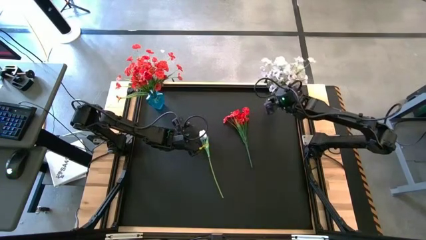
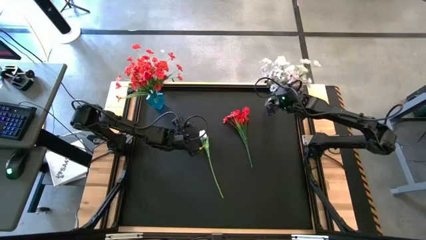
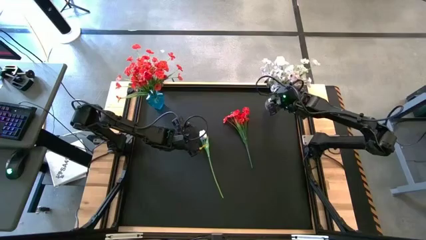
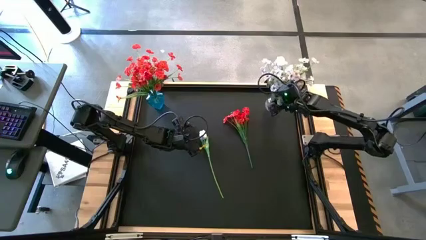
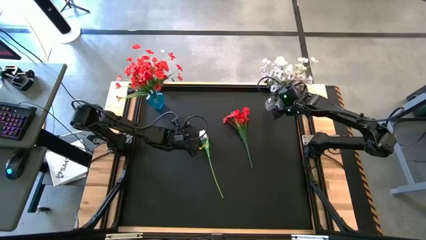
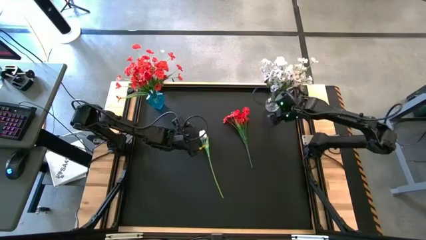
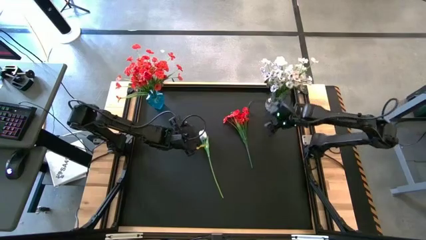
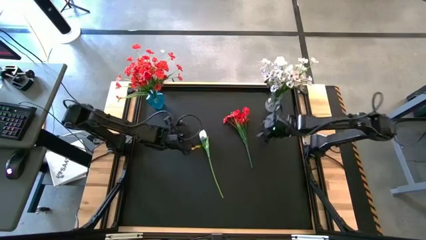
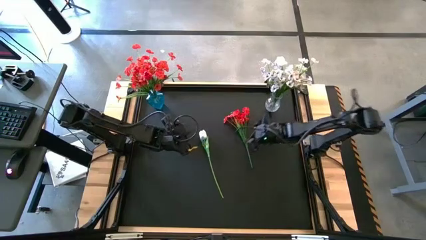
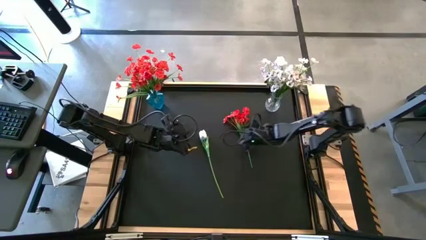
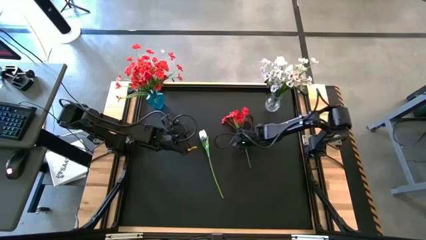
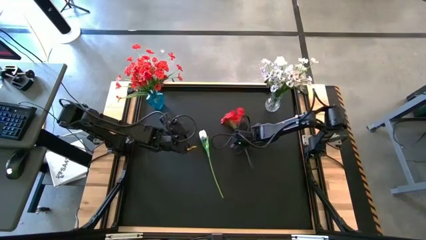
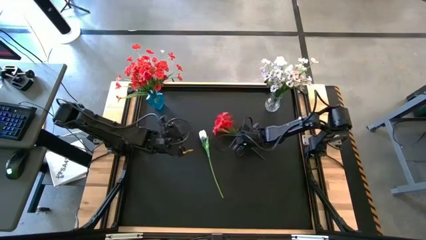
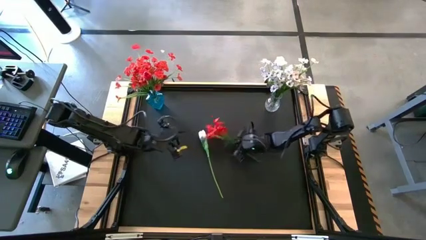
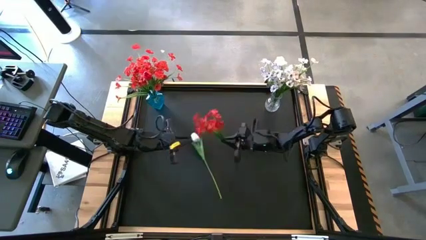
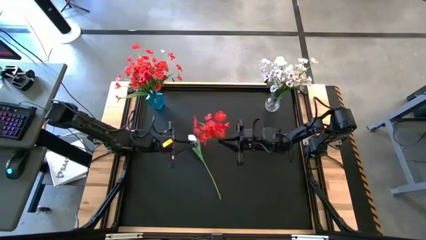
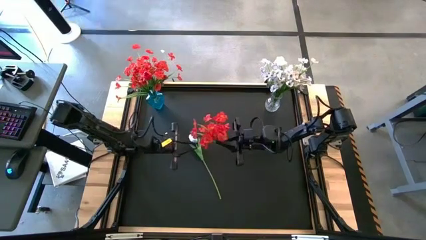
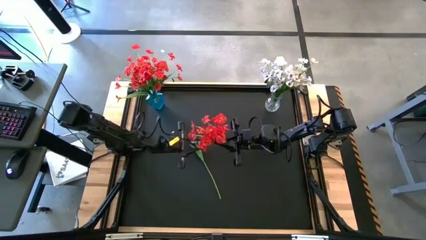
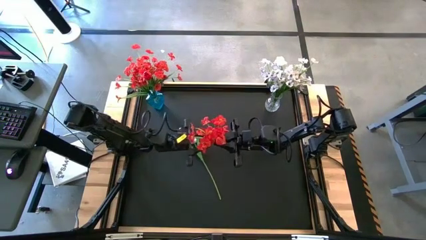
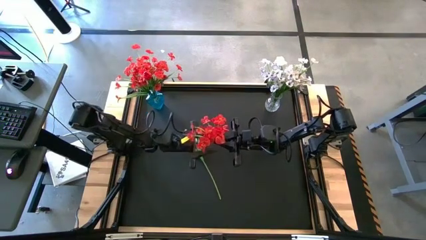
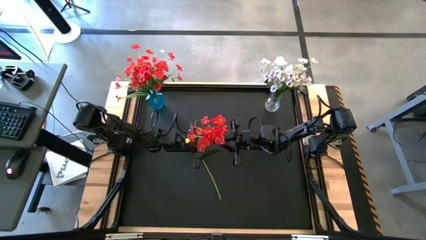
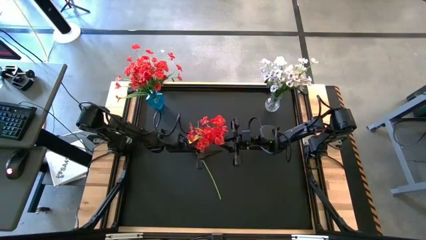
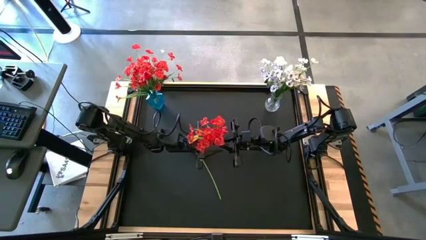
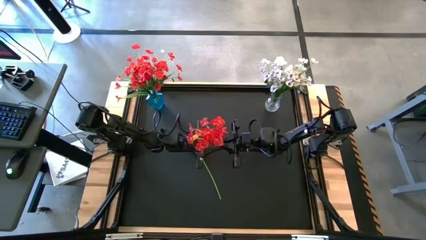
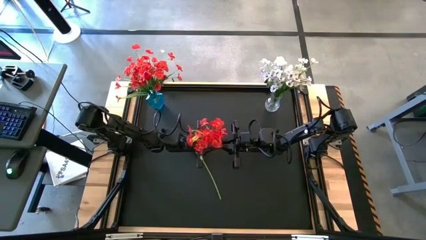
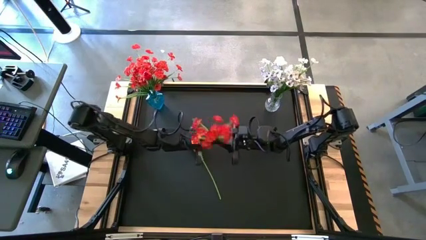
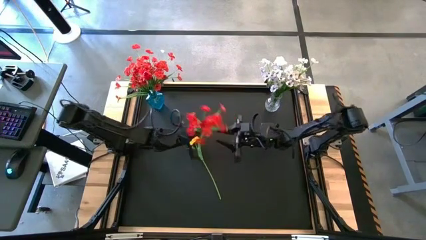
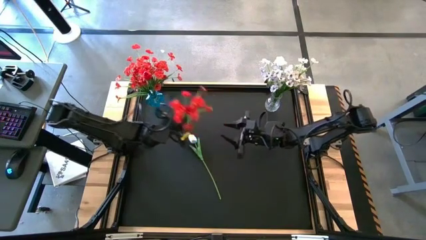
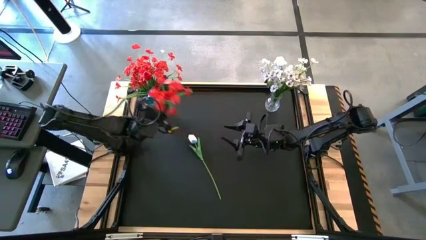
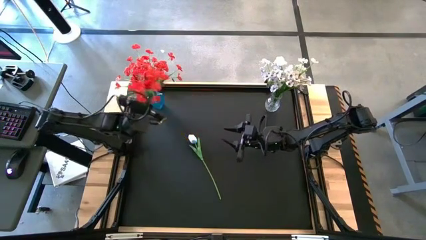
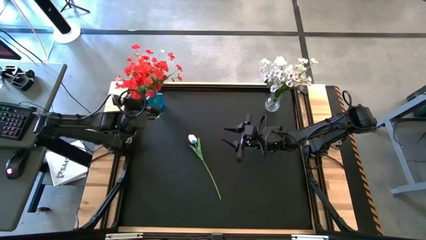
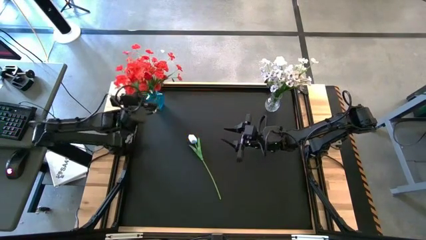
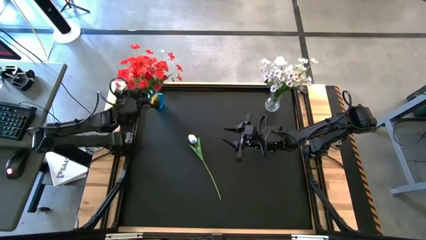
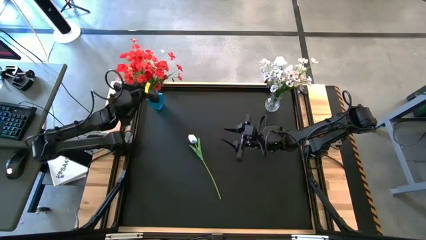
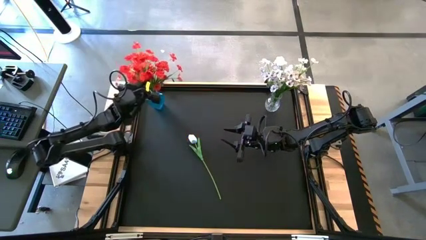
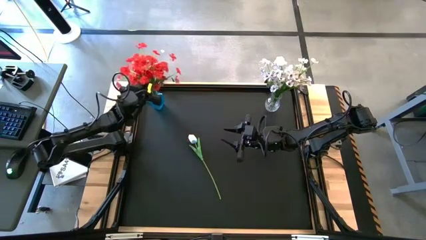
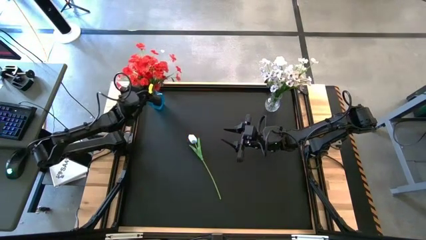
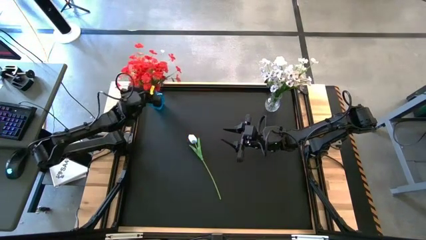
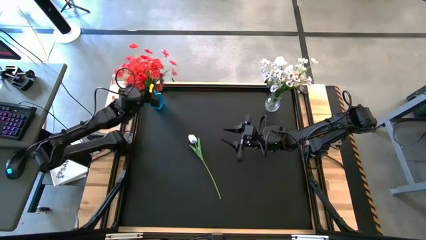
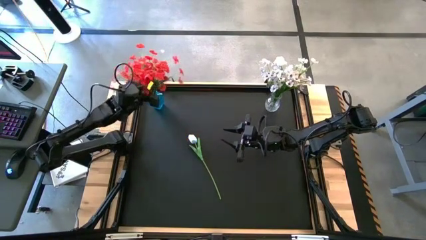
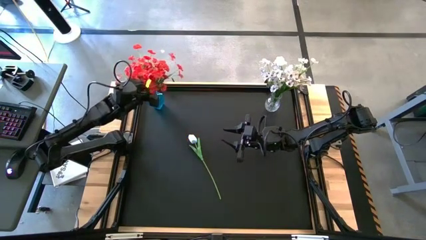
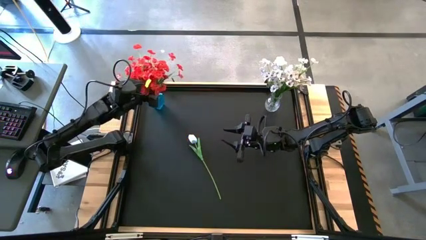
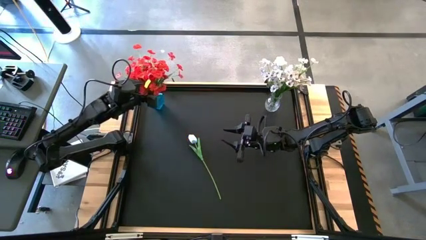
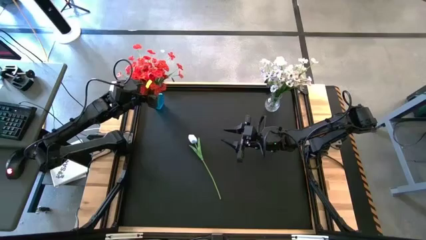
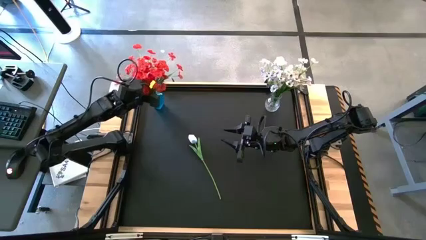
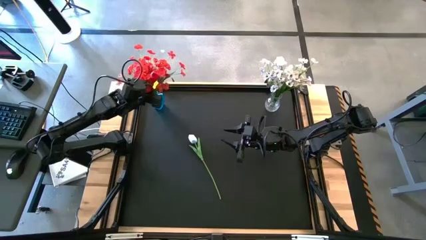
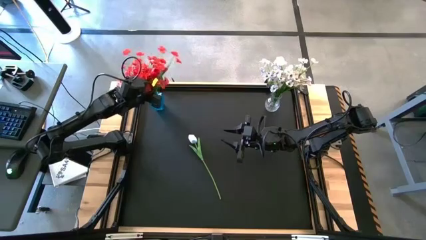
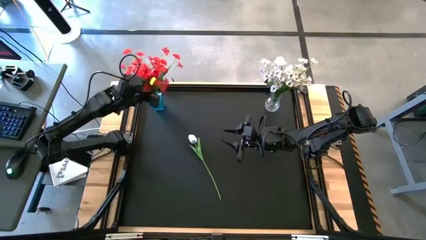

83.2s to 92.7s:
Task: Sort flowers into vase by color
Put the orange orchid into the blue vase

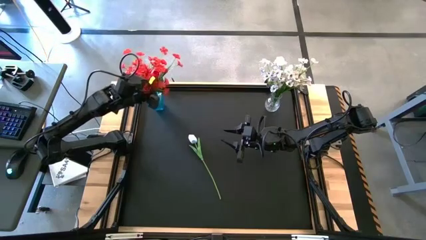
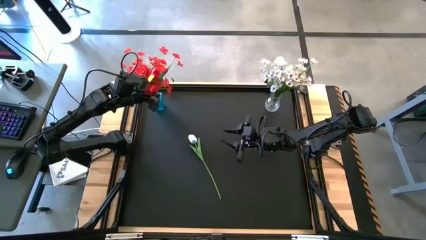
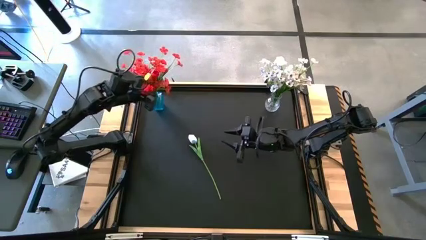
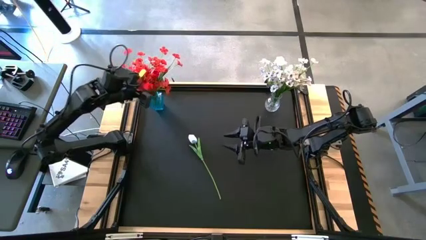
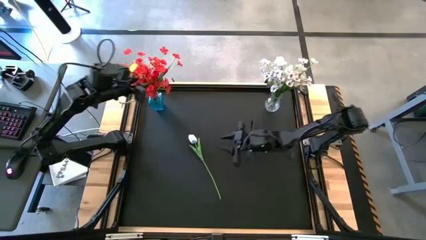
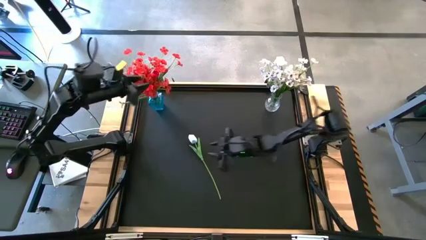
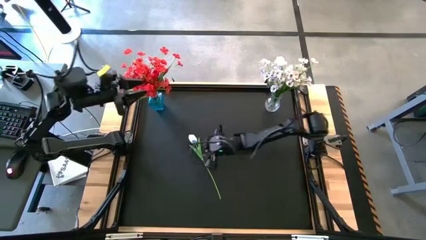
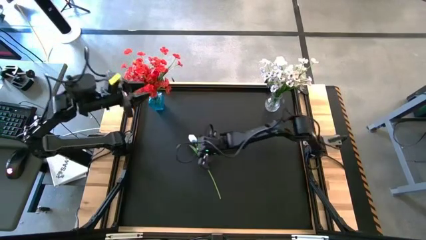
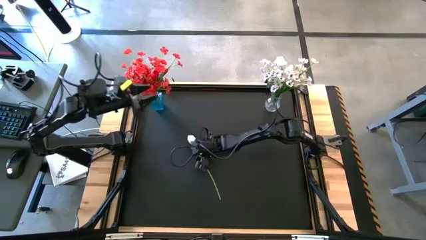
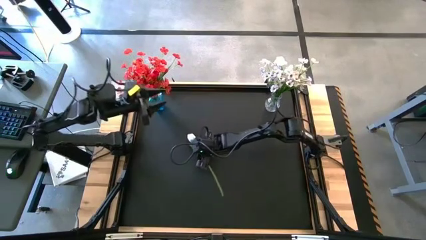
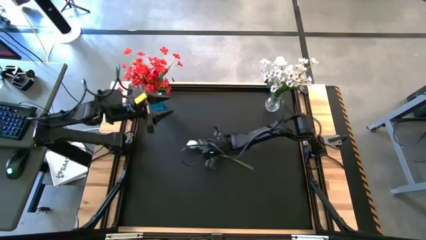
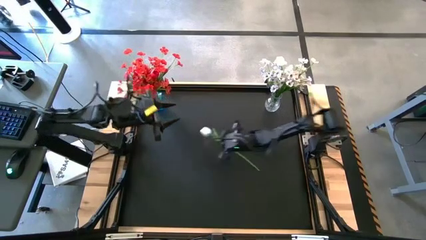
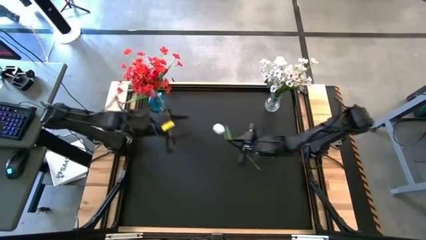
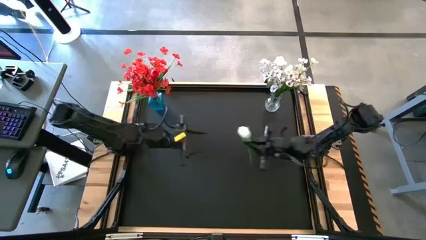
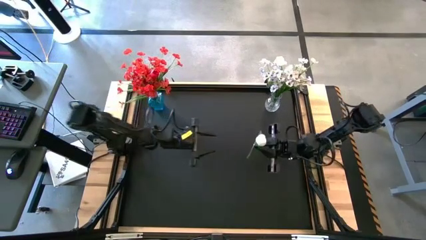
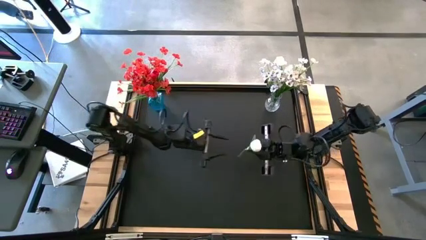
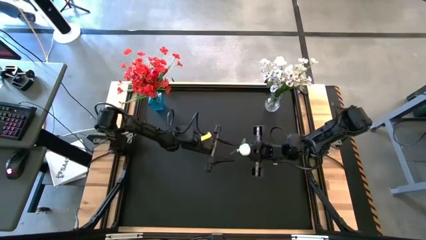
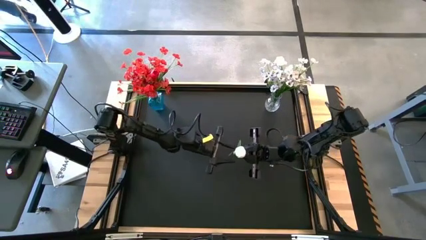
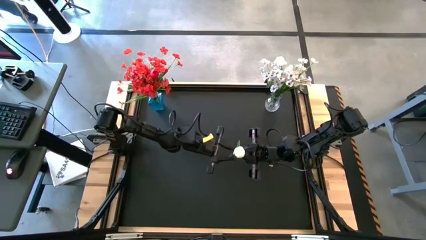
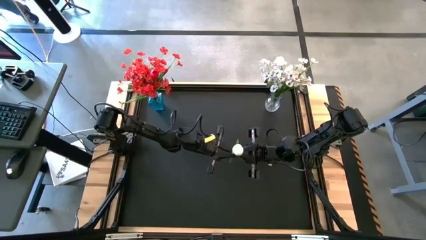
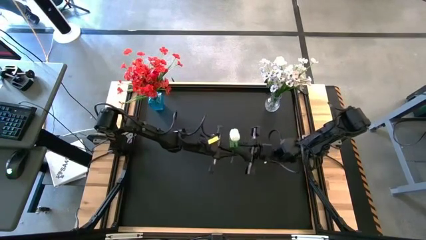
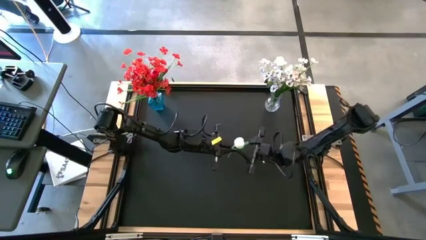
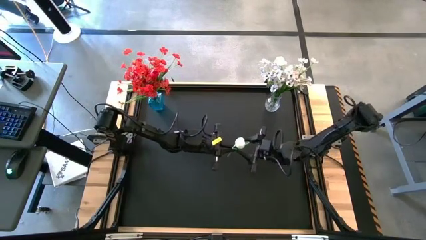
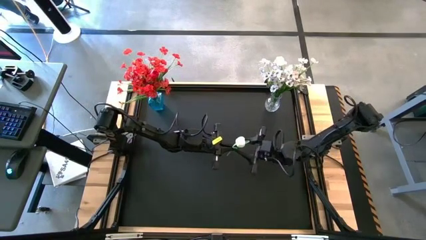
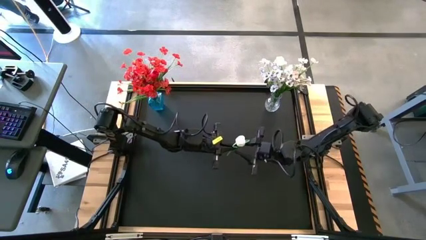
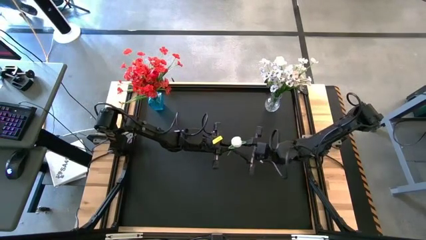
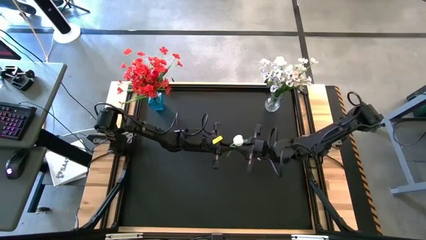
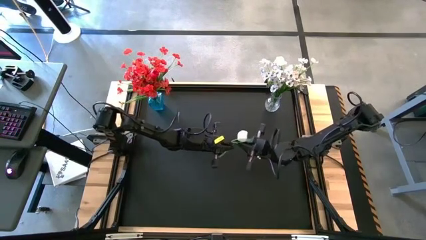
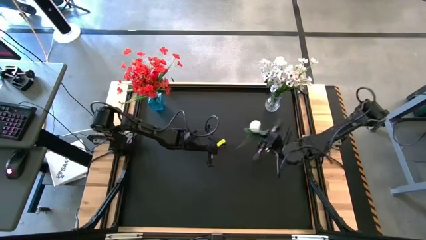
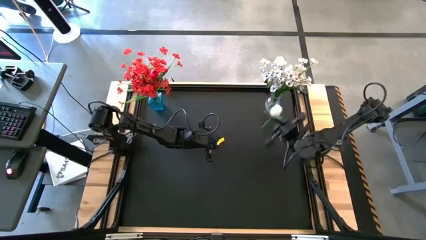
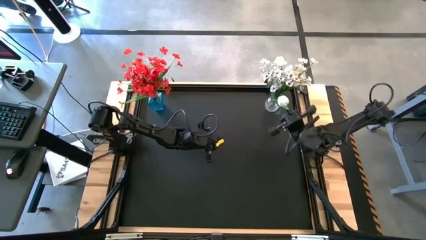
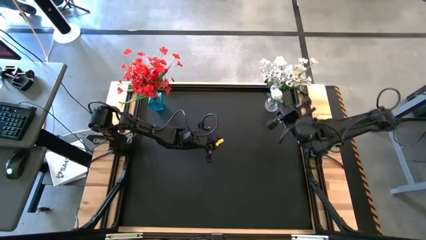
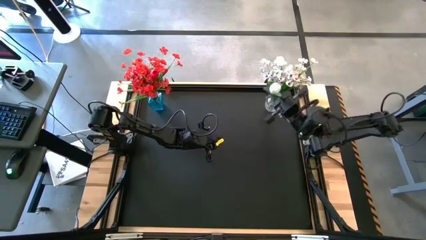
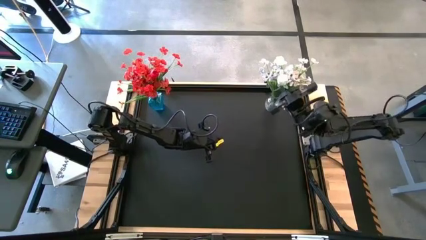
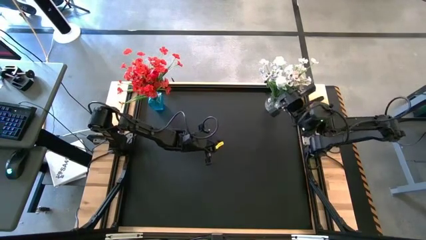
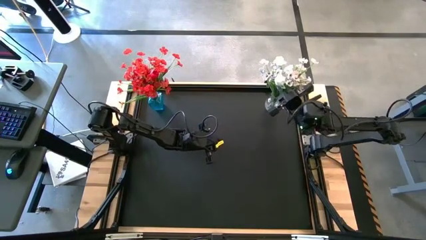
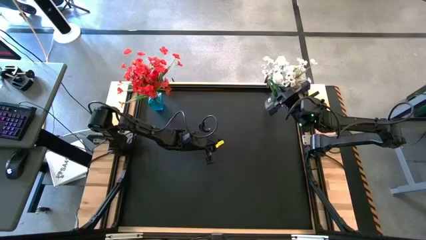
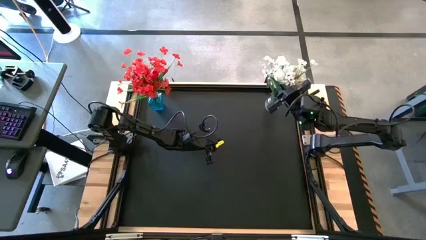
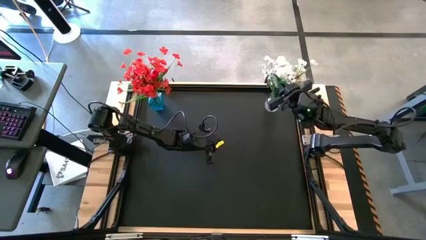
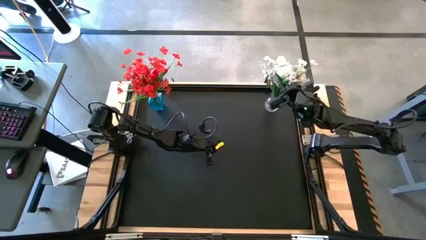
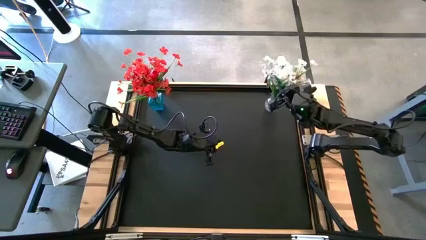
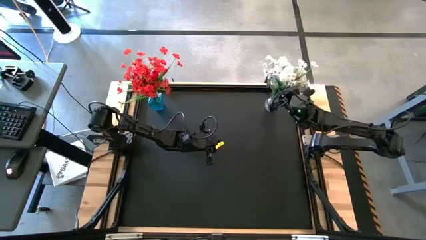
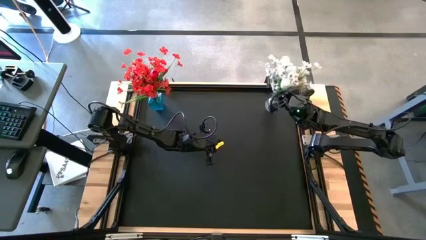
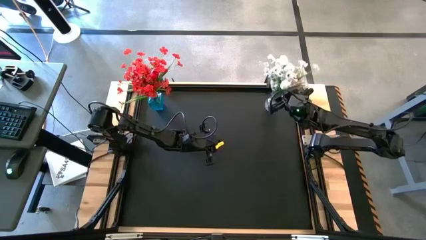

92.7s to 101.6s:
Put the white tulip into the transparent vase
